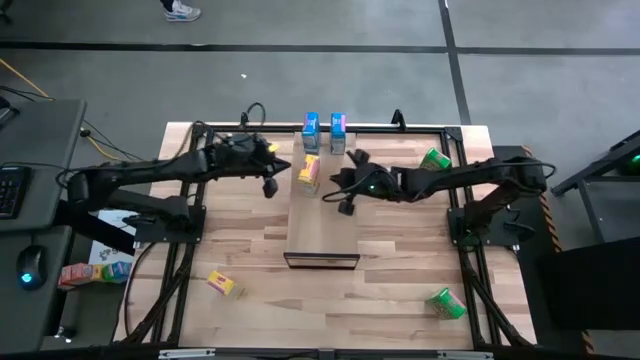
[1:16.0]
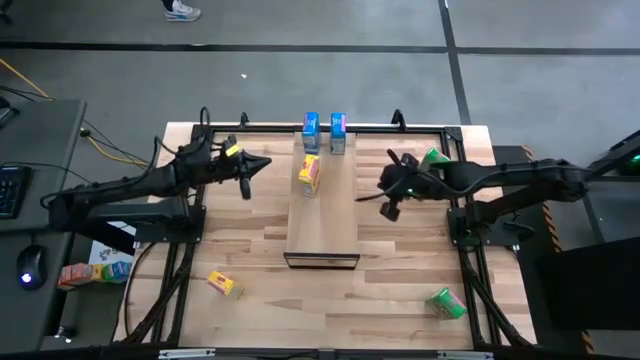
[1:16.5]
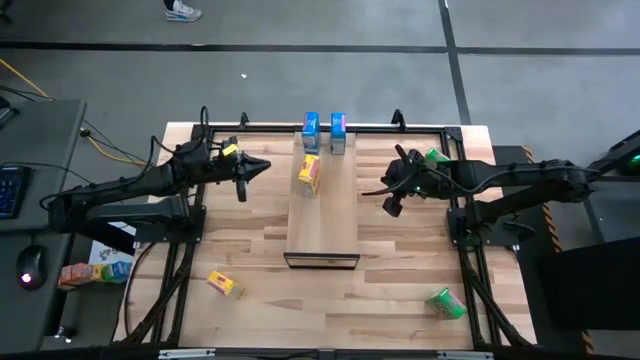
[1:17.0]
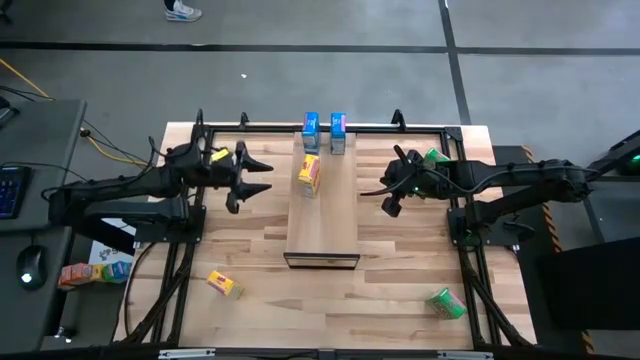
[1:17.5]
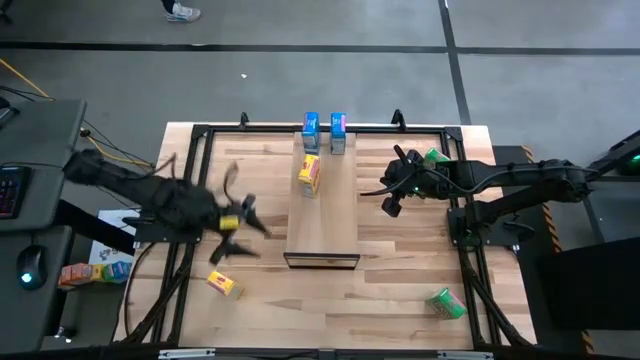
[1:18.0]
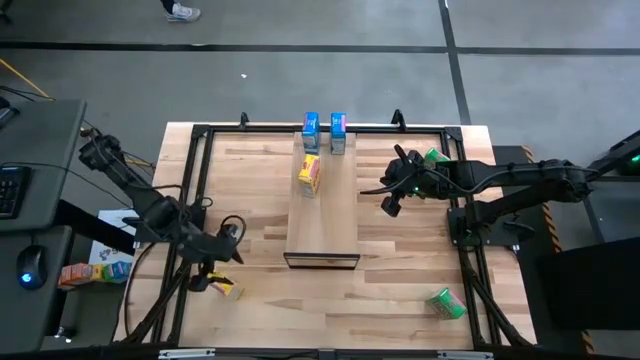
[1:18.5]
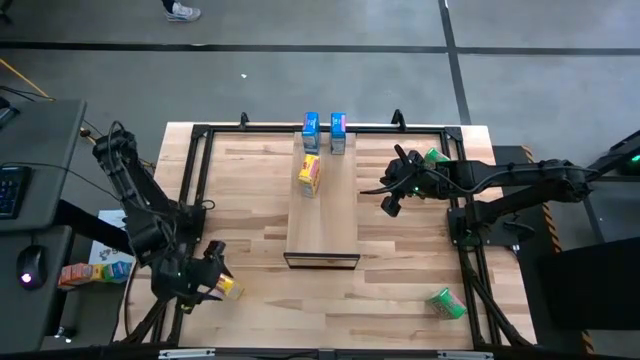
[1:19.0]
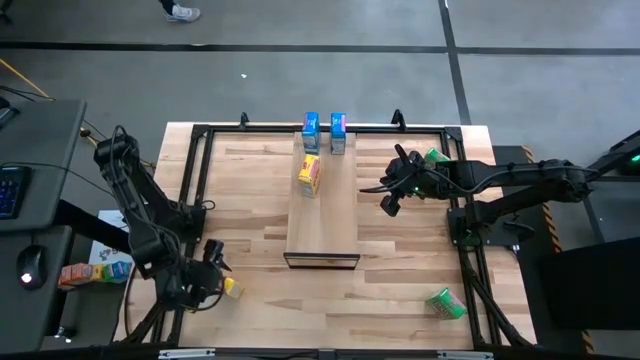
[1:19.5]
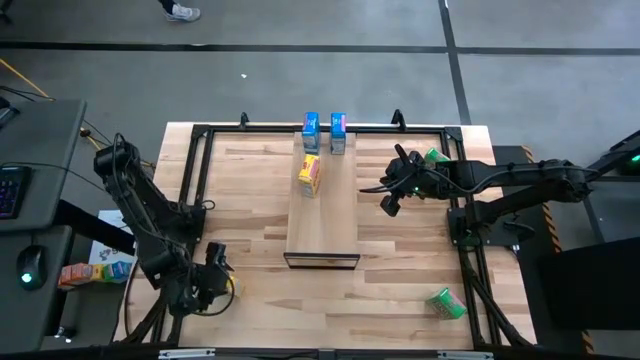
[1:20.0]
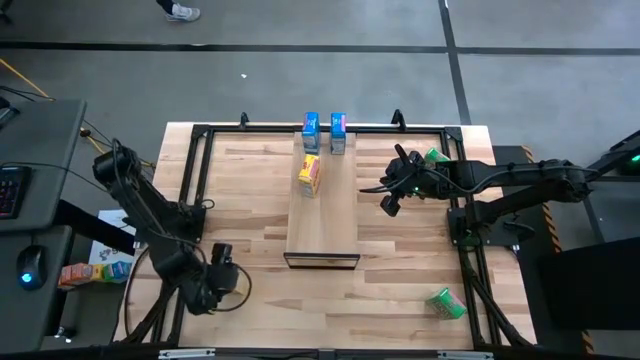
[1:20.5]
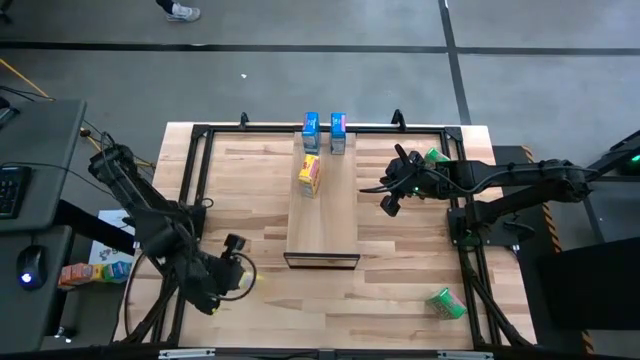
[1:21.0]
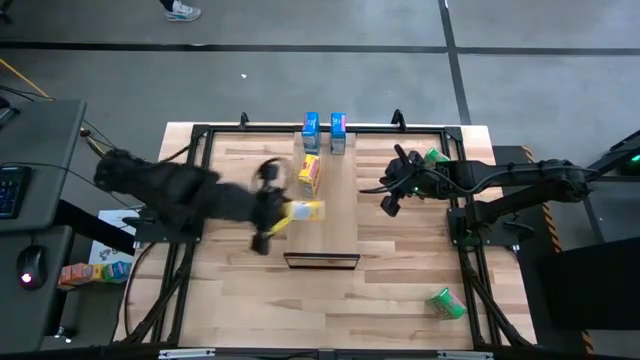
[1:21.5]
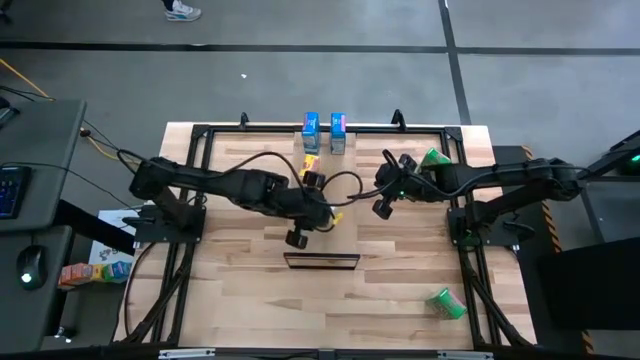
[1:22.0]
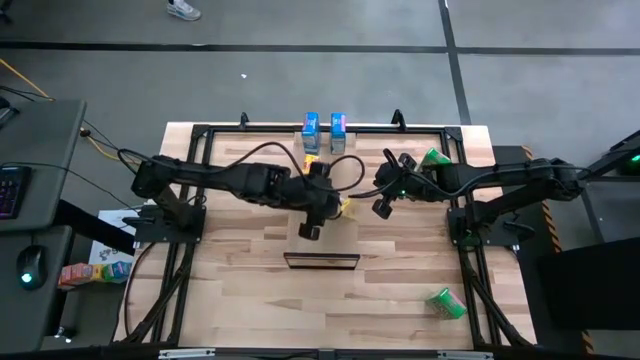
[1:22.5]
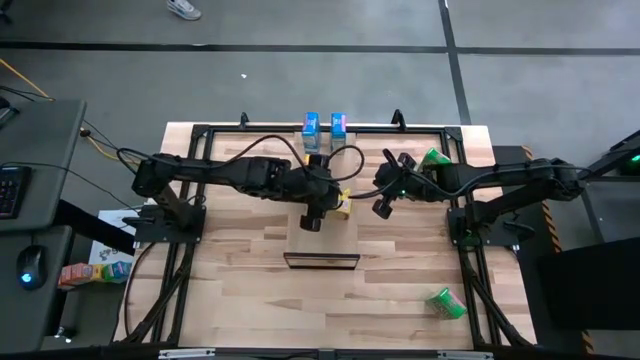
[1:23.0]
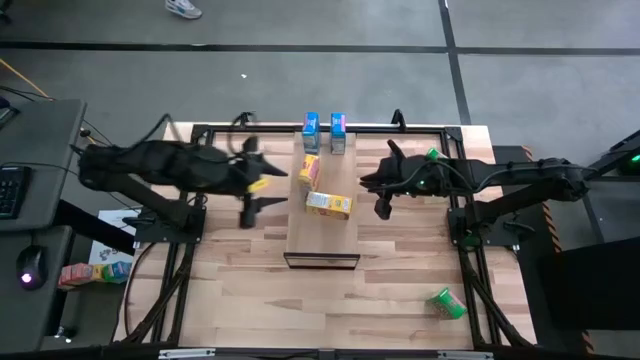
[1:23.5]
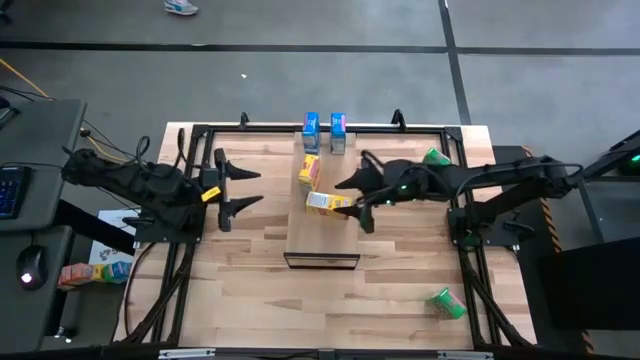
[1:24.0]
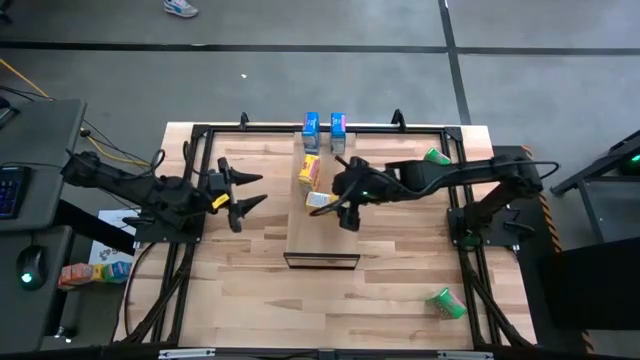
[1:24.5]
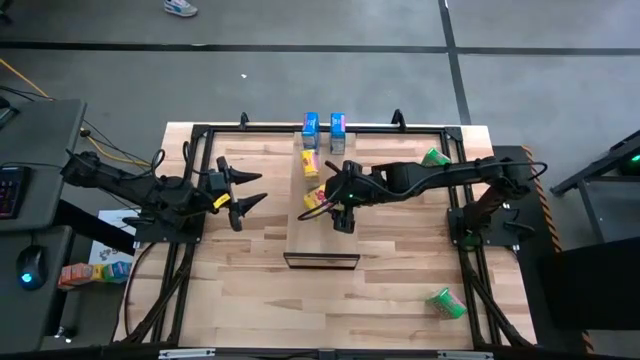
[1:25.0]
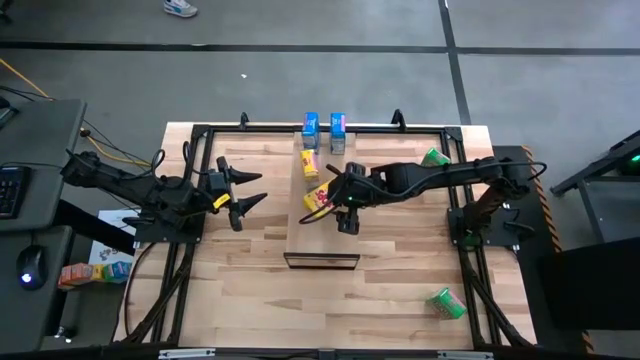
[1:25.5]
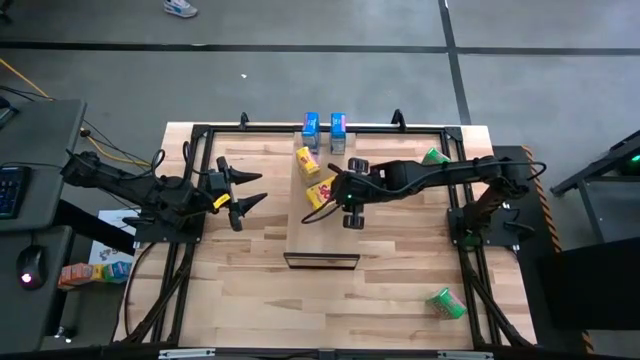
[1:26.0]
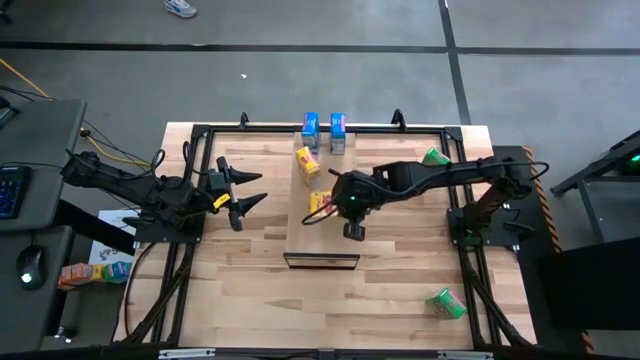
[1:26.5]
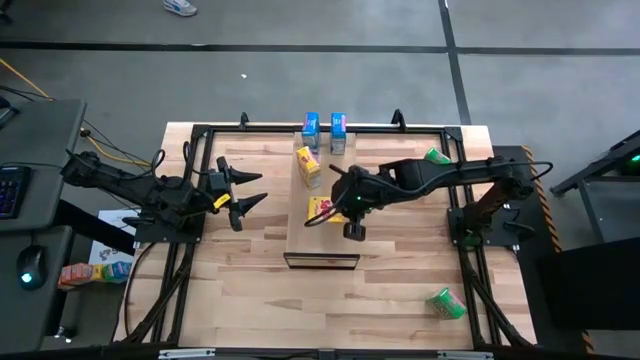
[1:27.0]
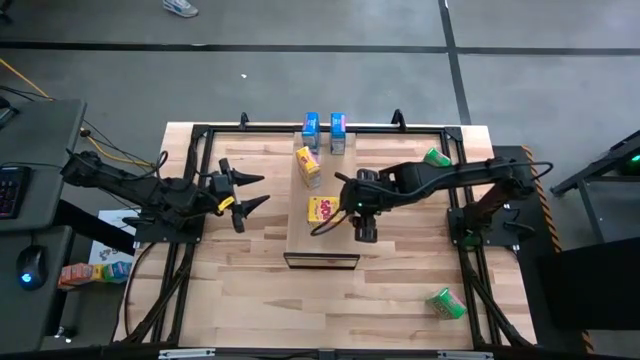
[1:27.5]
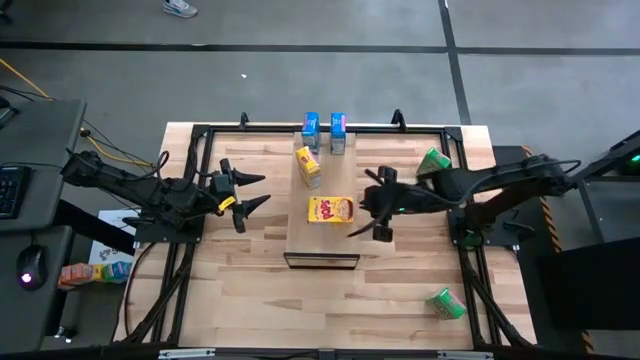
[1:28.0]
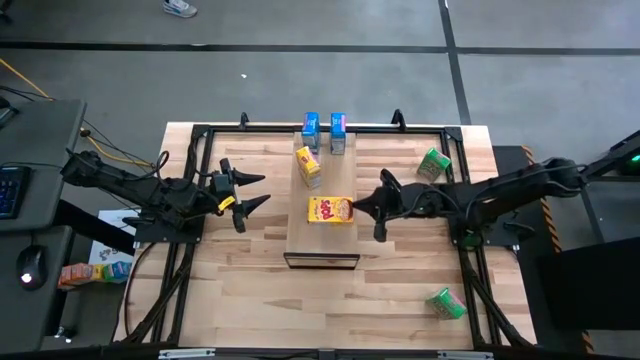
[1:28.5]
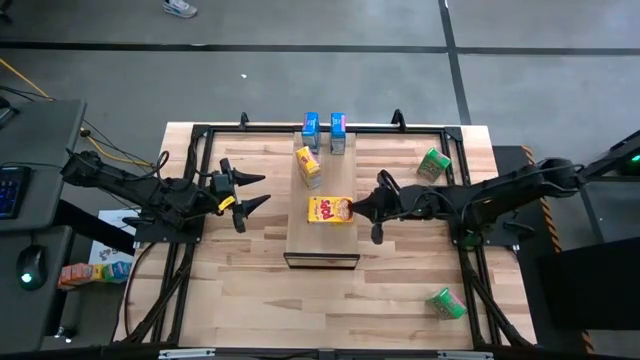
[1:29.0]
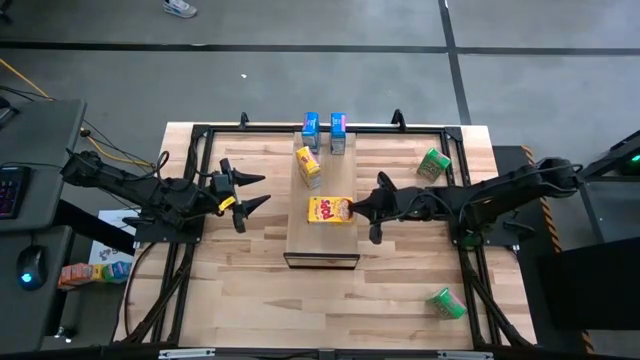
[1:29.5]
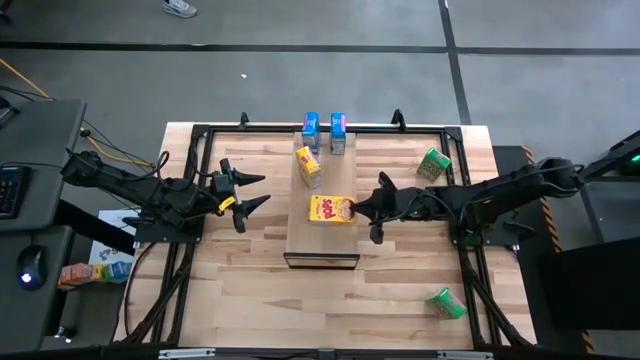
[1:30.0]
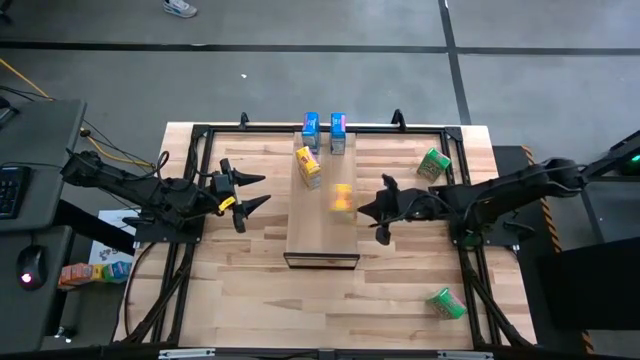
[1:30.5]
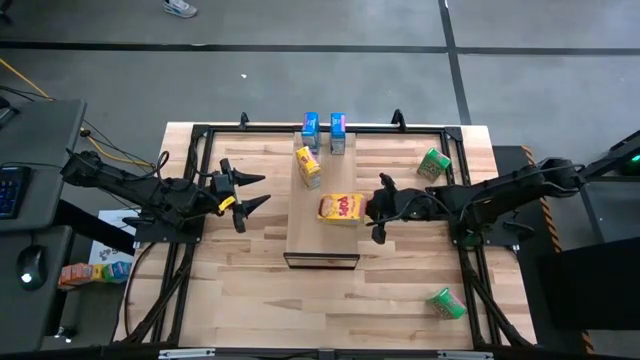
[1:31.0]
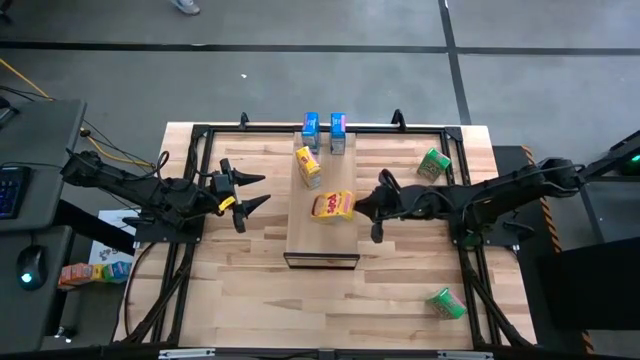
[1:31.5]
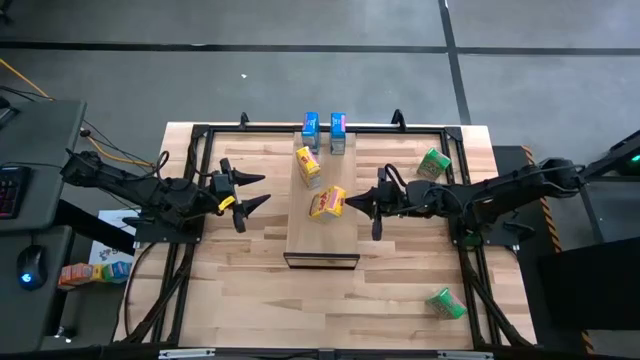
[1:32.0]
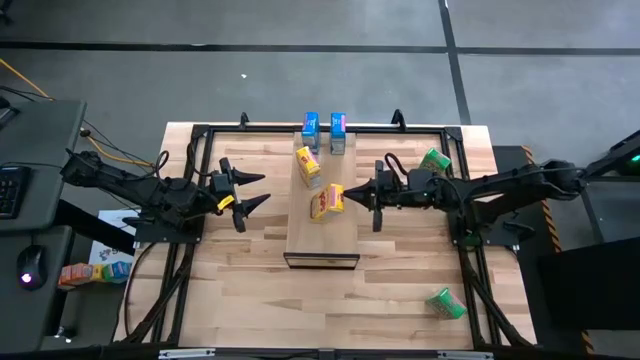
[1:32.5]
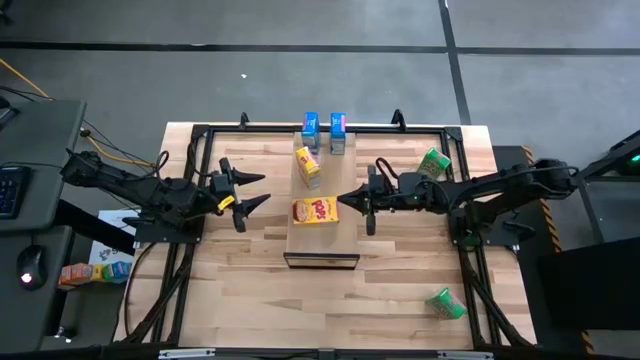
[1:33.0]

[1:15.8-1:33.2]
Task: Stack cereal on shelf
Put the yellow cereal box on the shelf

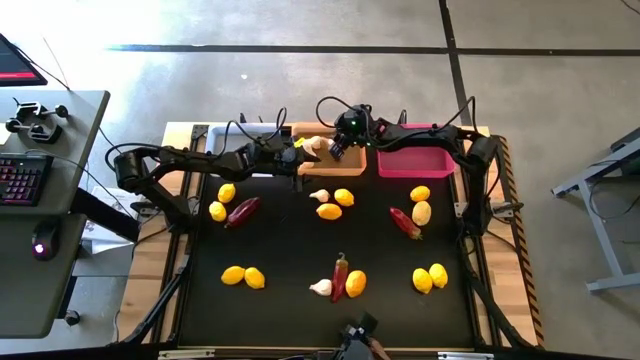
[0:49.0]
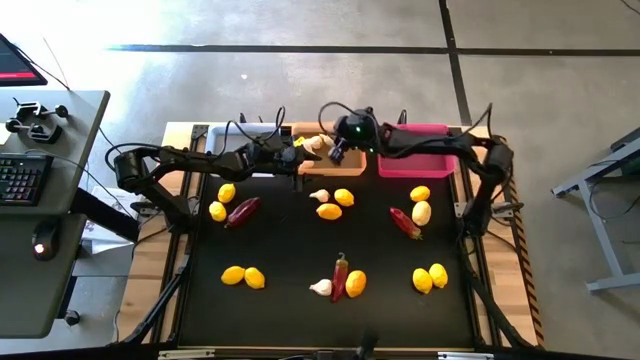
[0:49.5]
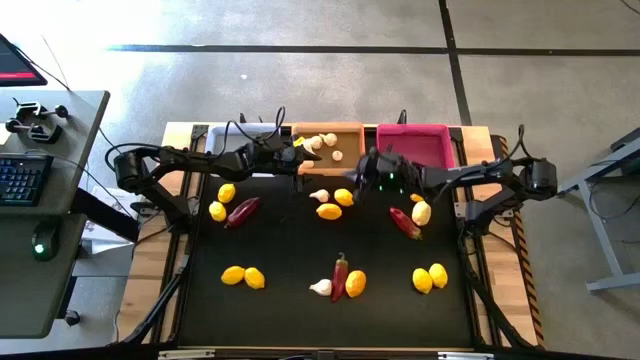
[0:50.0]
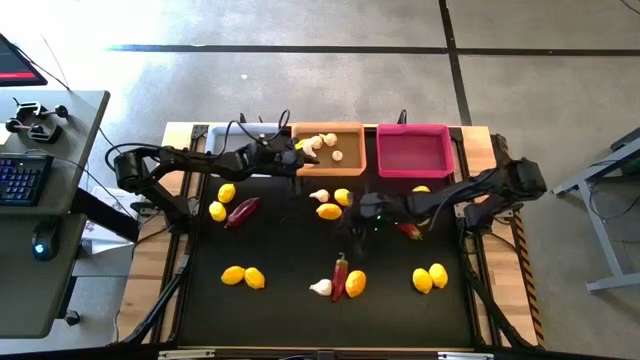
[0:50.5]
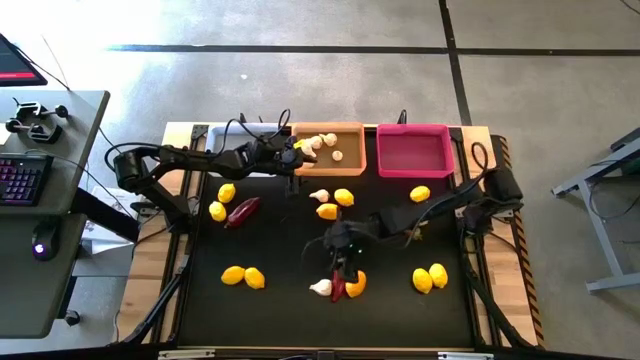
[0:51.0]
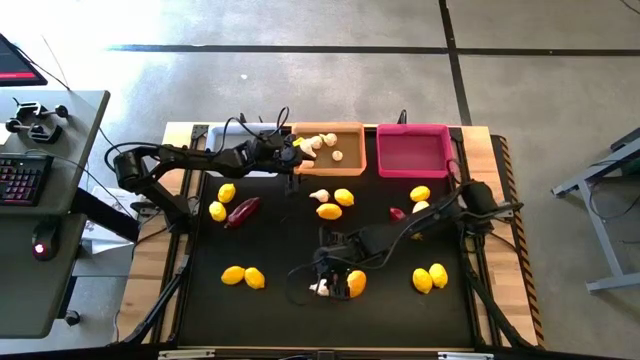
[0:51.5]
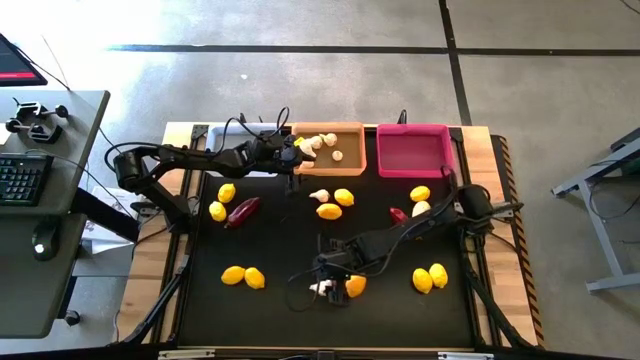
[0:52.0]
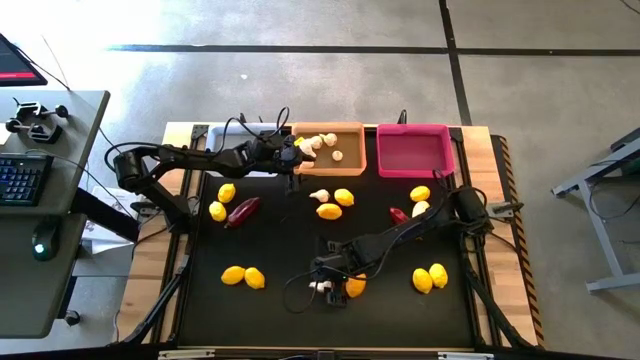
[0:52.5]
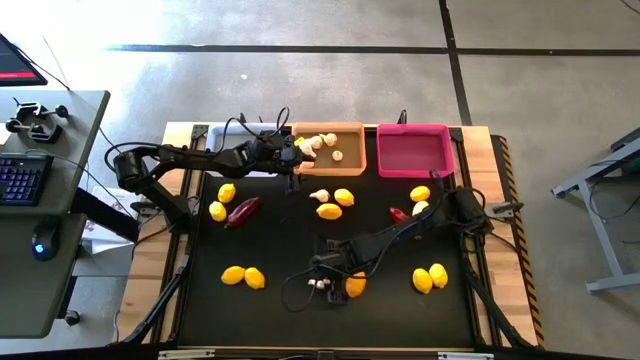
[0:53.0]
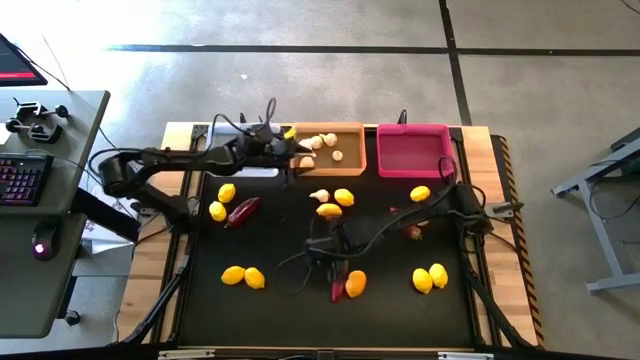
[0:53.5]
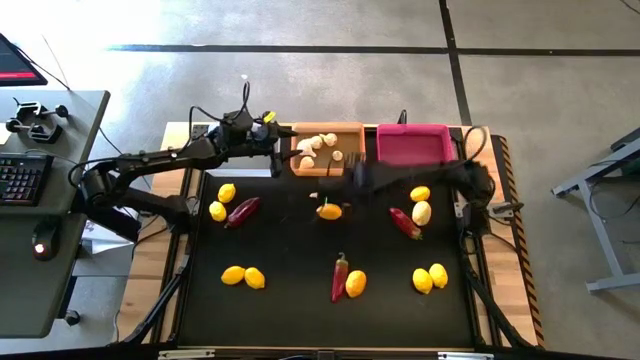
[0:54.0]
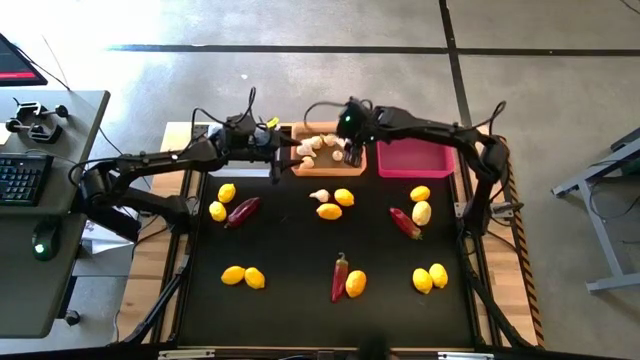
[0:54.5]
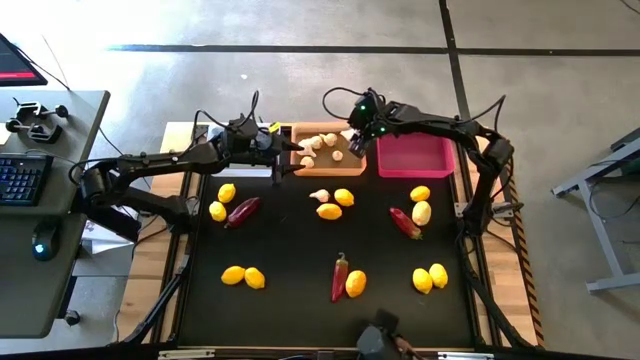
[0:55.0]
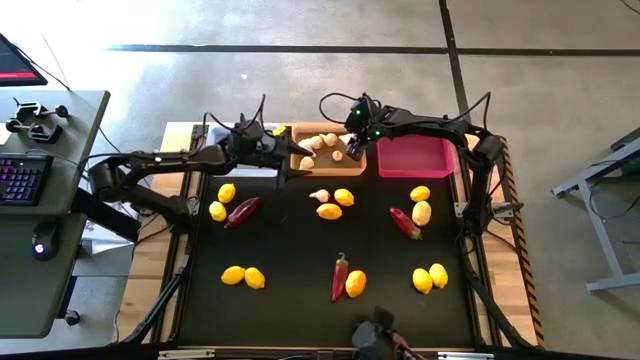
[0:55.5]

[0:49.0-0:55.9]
Task: Sort produce into baskets
Put the white garlic into the orange bin
